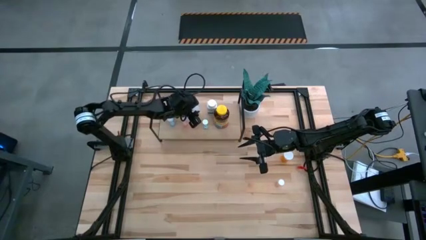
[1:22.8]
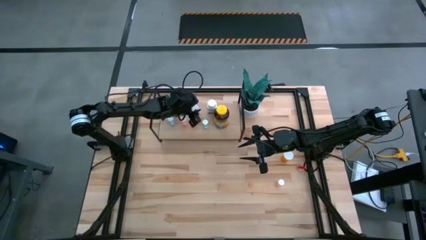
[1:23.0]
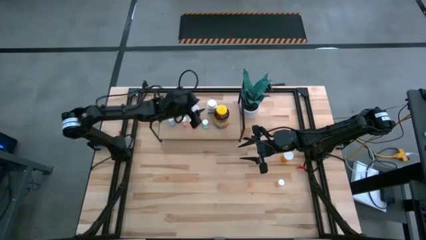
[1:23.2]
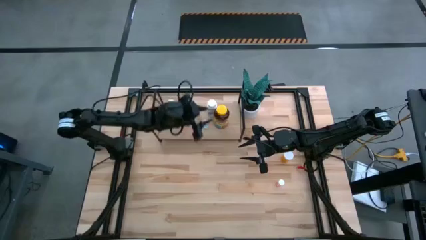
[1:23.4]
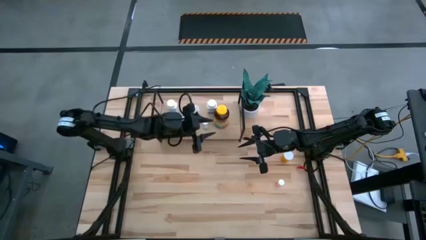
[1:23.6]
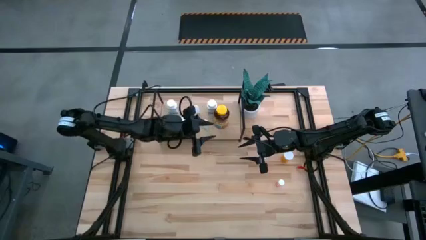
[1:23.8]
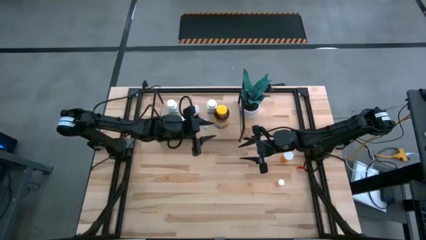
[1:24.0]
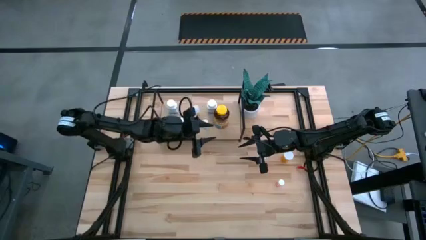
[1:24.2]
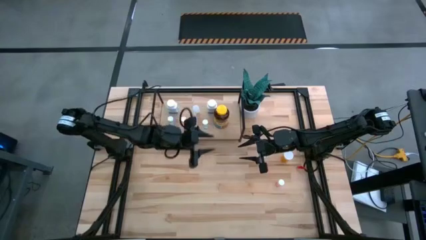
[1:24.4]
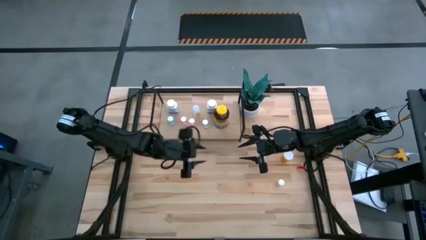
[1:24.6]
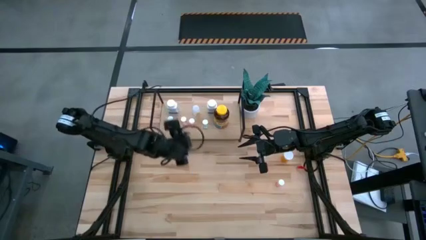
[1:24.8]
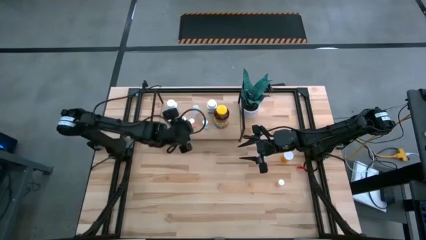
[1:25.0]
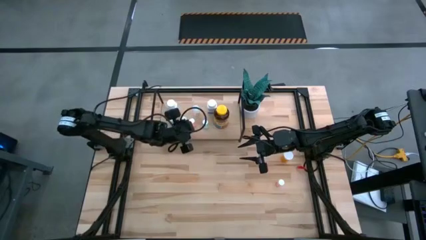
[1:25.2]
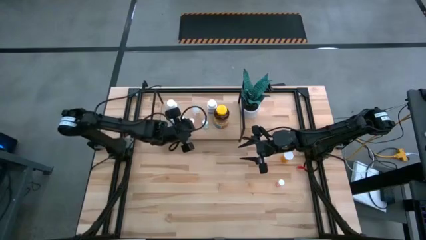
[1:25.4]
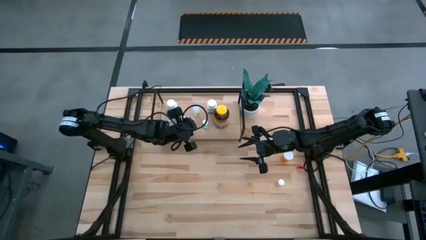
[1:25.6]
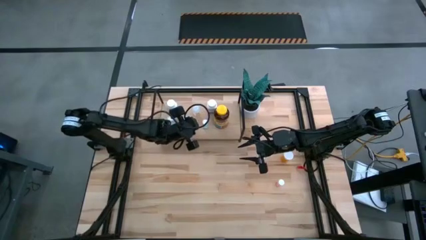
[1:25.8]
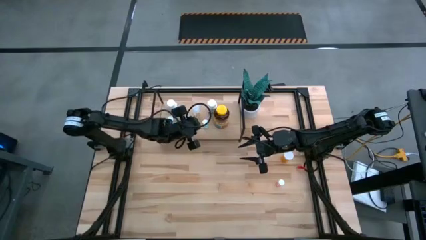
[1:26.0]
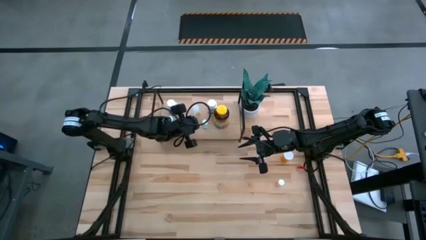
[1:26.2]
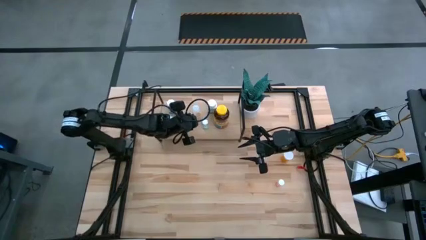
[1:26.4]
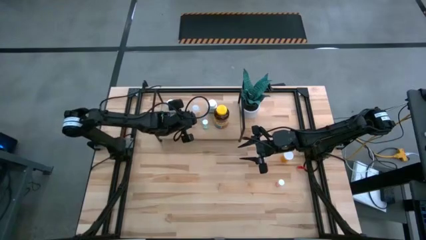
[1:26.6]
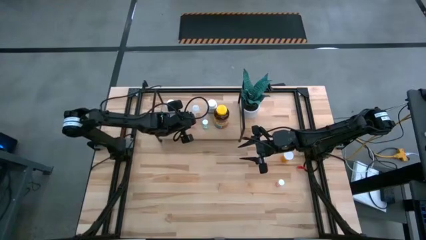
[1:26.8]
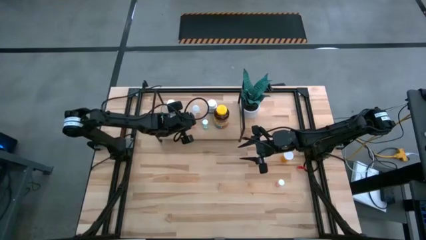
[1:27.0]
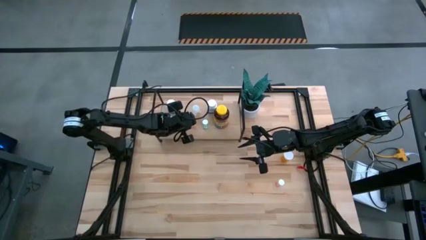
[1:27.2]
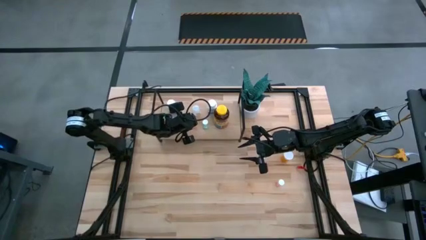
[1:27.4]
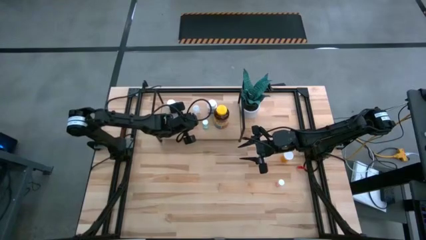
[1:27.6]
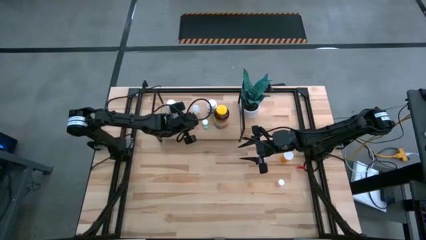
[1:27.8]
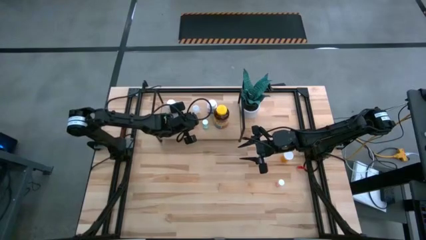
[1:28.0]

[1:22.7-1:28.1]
Task: Pick and place medicine bottles onto shelf by color
Adjust the pink medicine on the shelf

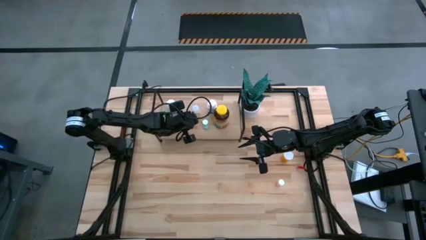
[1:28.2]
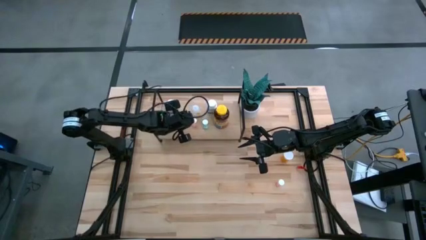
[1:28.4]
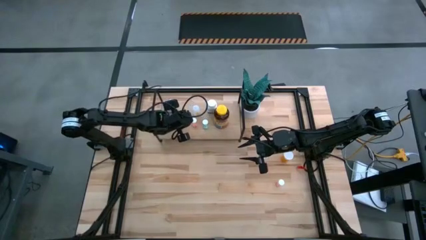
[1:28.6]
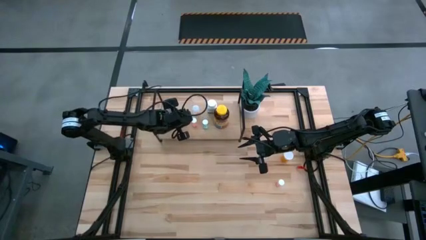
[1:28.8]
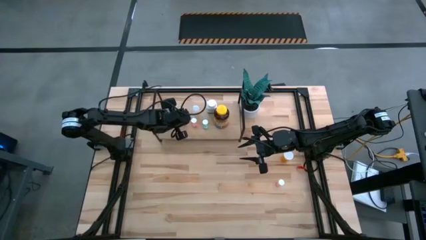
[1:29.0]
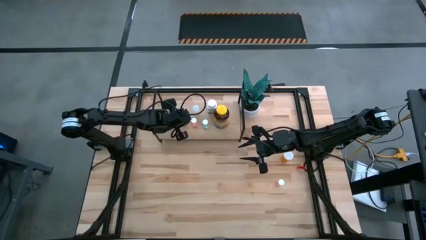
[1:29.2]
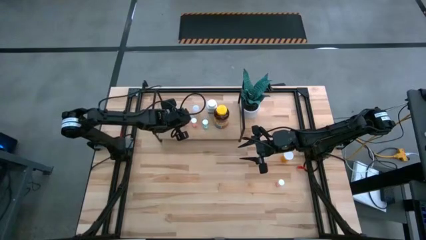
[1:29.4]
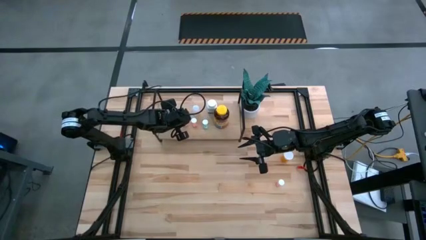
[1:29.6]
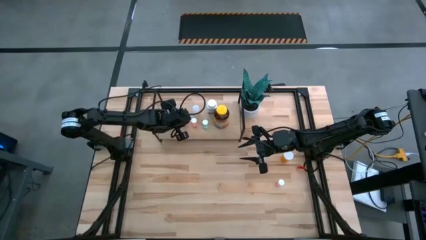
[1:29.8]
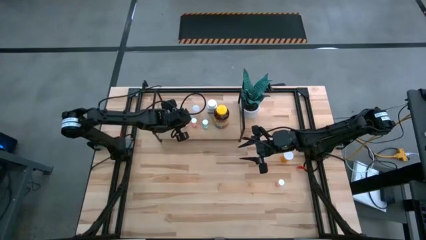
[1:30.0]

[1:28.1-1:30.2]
Adjust the pink medicine on the shelf

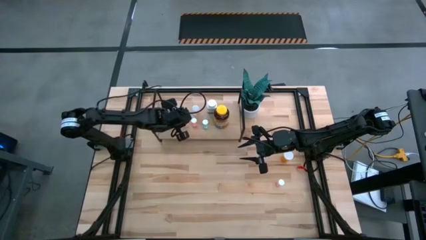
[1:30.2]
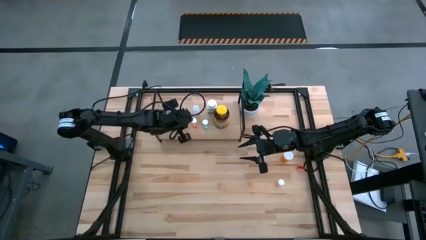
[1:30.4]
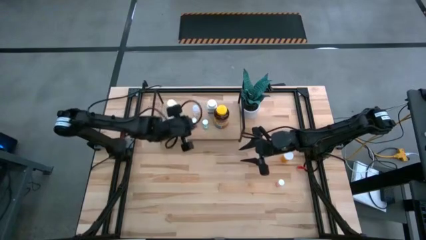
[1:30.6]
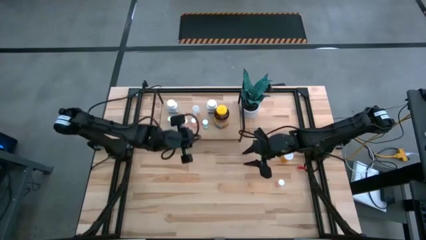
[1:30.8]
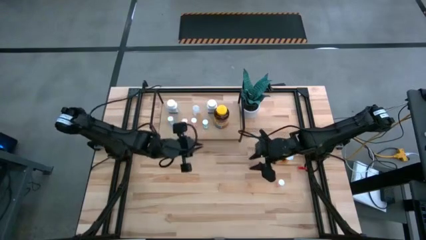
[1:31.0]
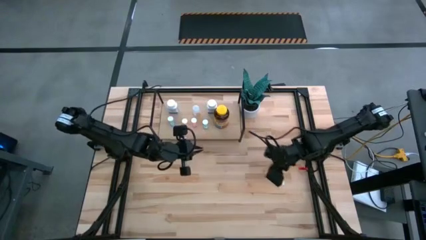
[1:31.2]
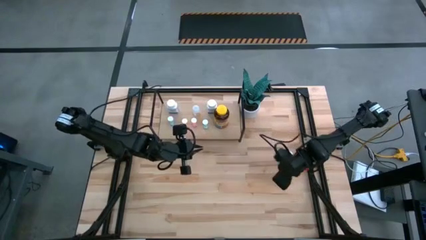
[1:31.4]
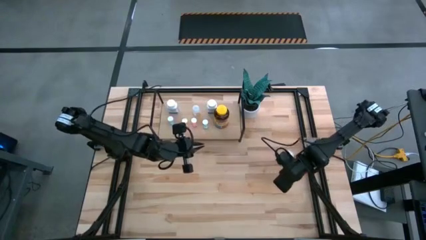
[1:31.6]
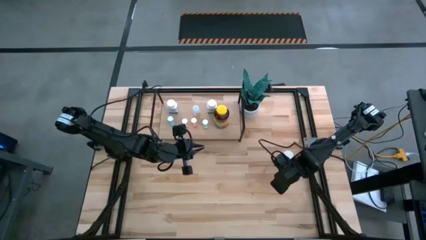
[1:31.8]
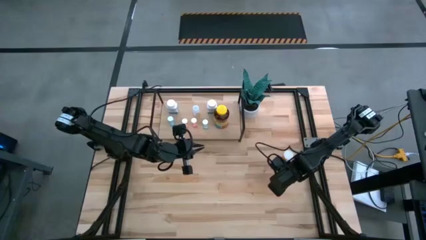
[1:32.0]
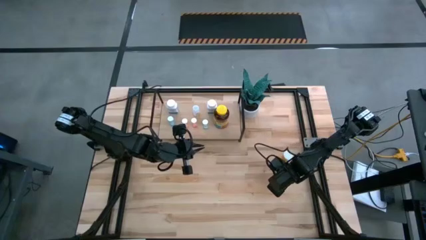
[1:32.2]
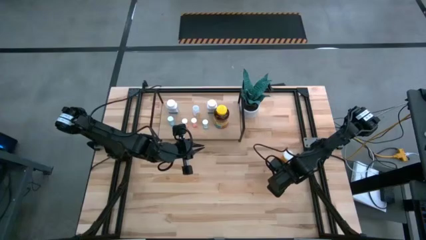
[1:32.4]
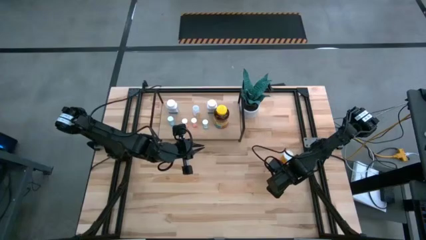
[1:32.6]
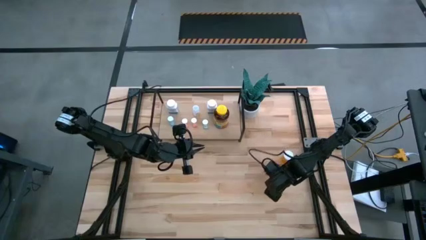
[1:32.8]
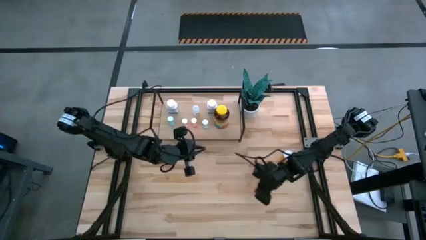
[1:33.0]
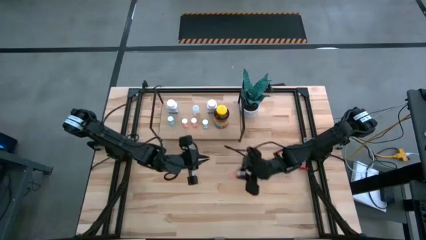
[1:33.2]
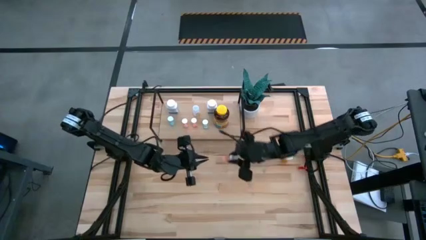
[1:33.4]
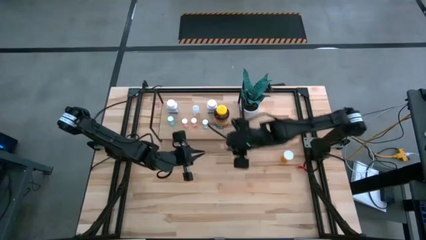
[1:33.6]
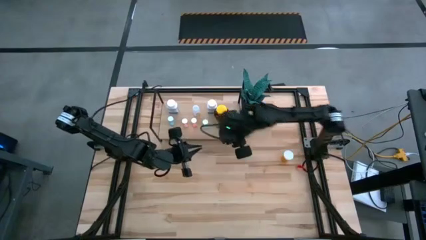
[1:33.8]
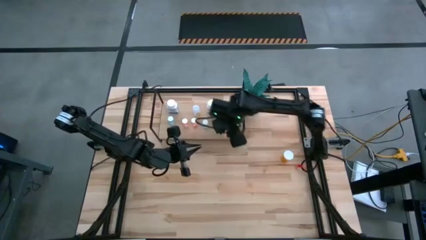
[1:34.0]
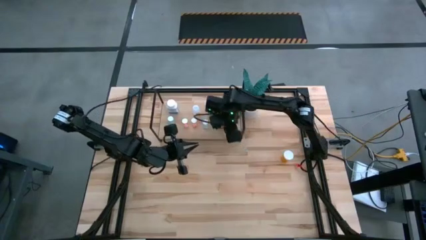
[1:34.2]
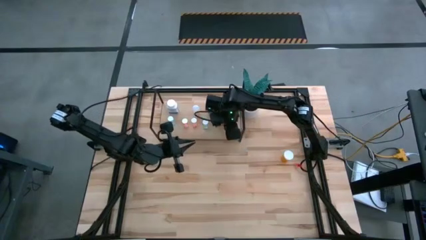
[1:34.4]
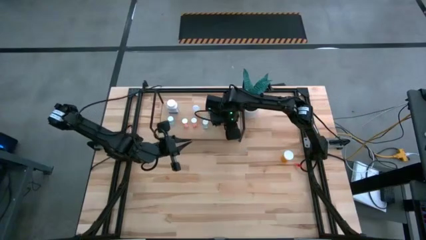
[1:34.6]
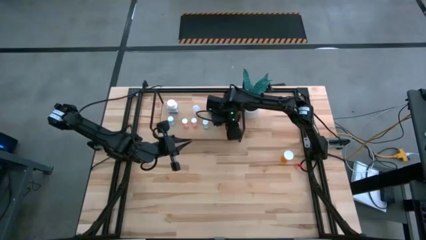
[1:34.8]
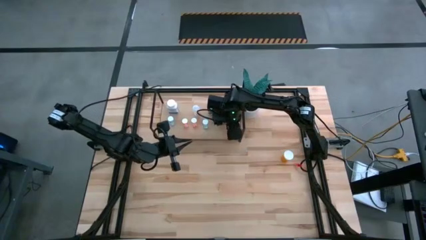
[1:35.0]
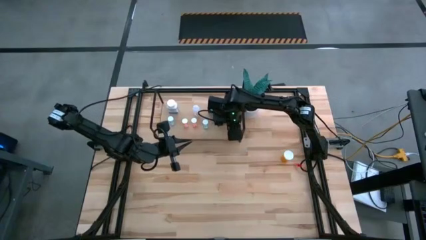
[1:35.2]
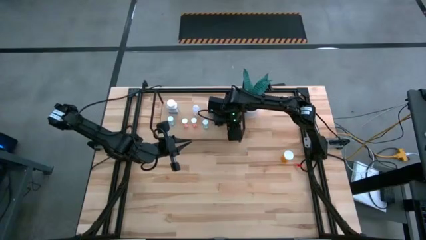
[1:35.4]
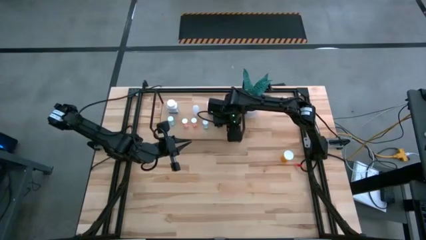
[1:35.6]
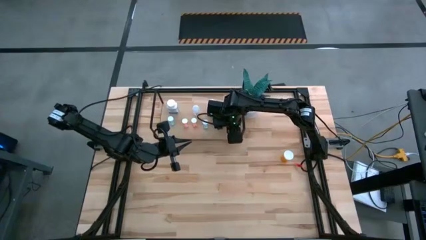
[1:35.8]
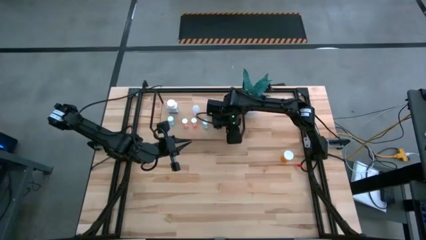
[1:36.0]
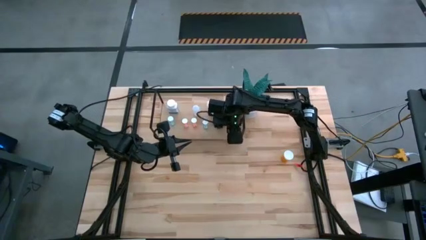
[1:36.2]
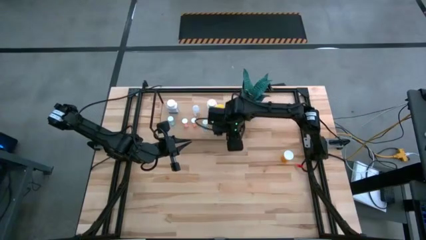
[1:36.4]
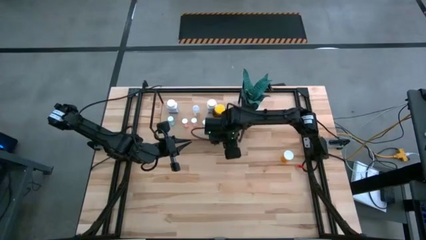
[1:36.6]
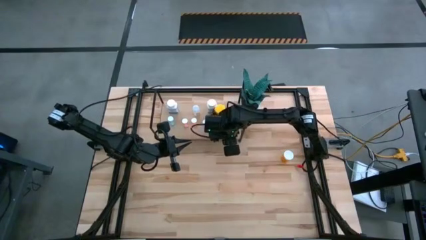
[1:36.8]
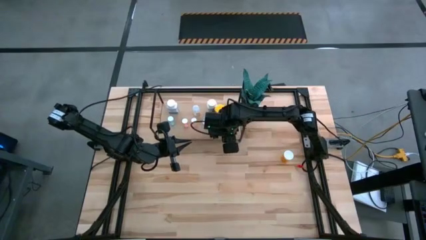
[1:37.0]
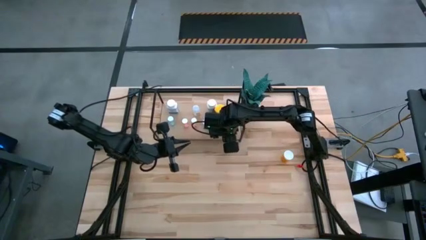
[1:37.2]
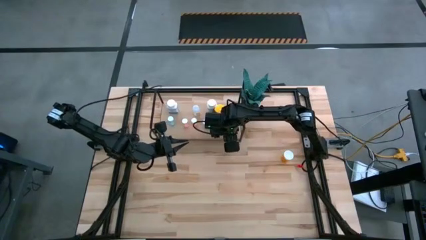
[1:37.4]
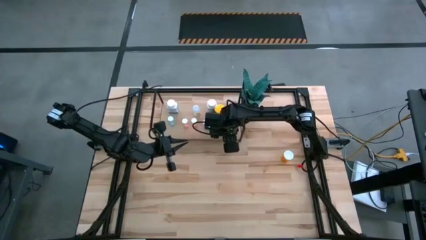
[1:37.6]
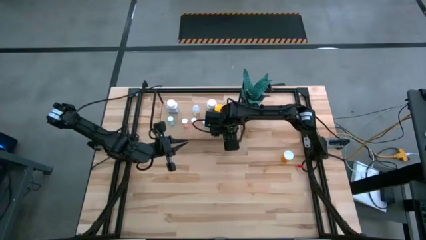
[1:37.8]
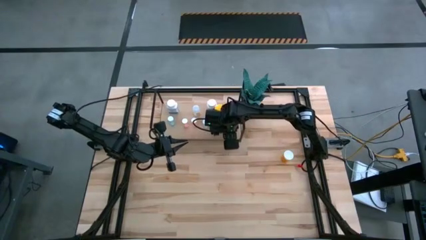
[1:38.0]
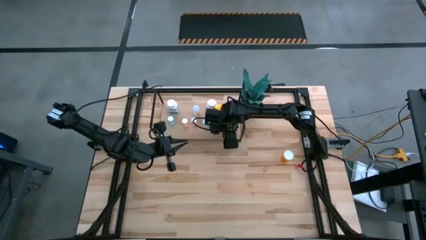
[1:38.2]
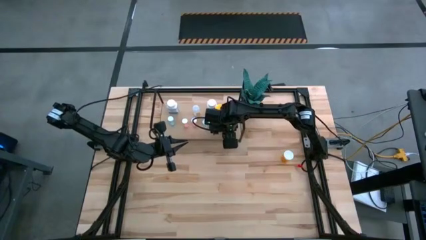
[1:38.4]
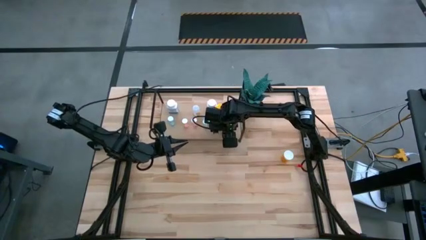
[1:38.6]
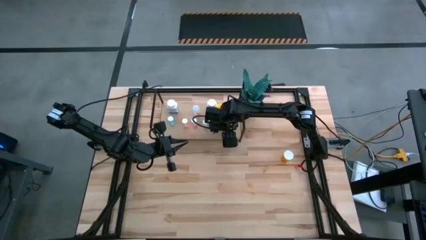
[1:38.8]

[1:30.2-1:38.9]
Put the pink medicine bottle on the shelf
